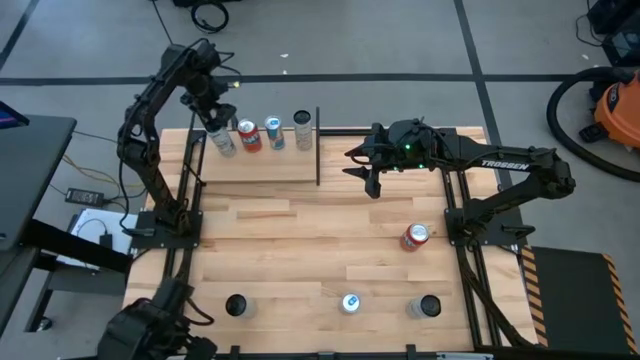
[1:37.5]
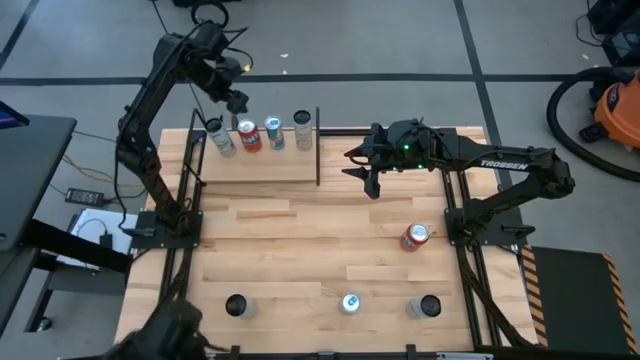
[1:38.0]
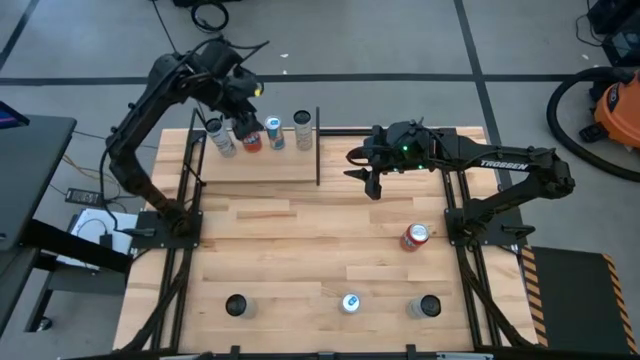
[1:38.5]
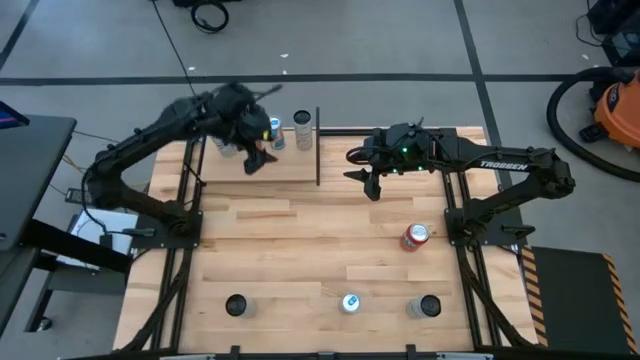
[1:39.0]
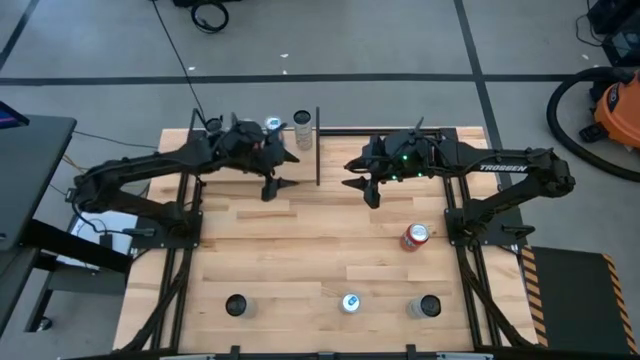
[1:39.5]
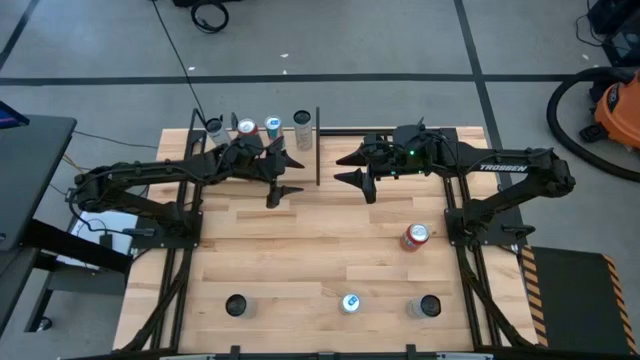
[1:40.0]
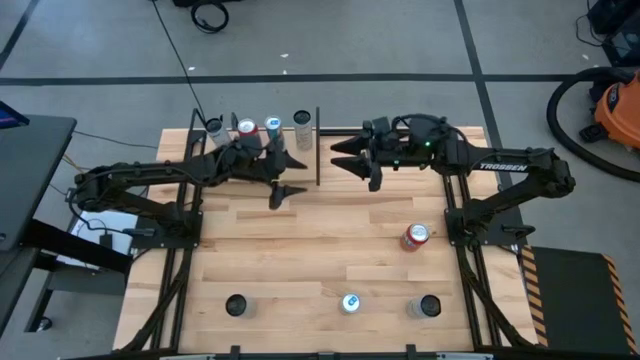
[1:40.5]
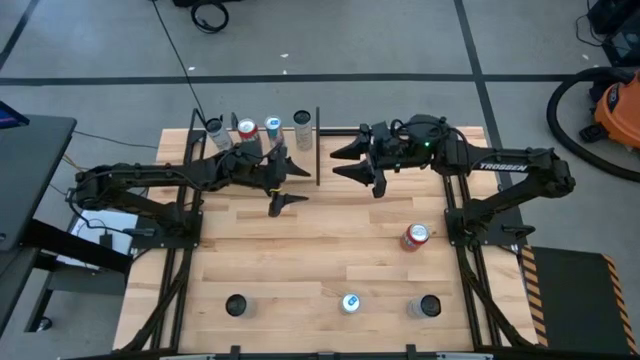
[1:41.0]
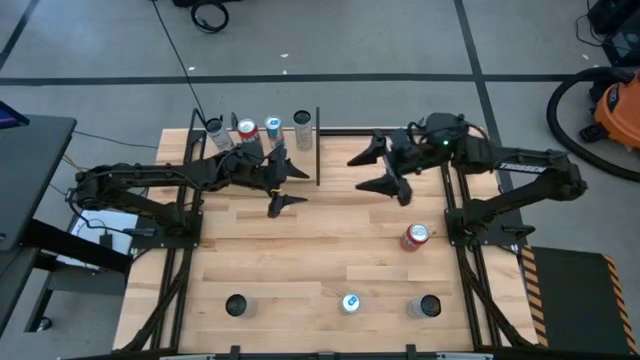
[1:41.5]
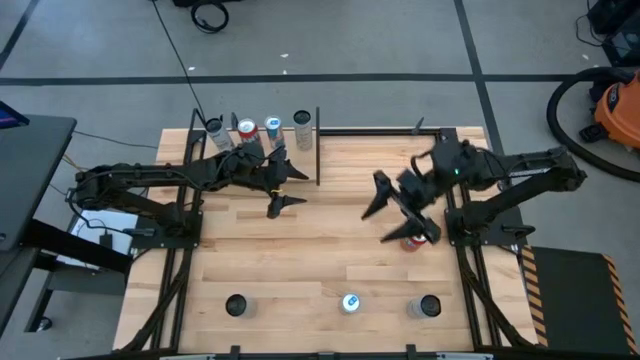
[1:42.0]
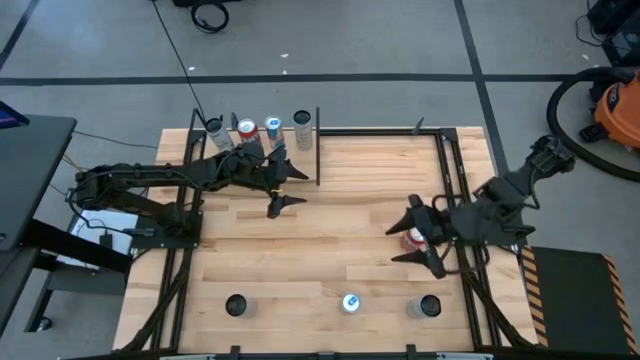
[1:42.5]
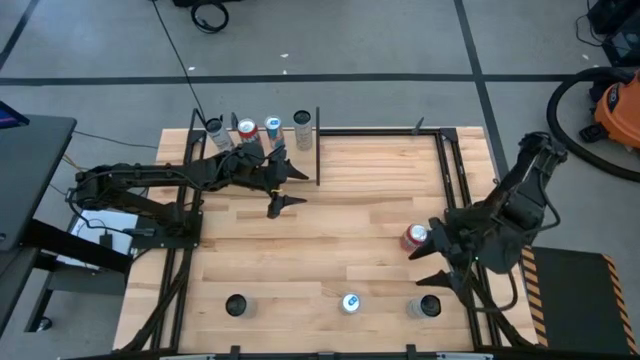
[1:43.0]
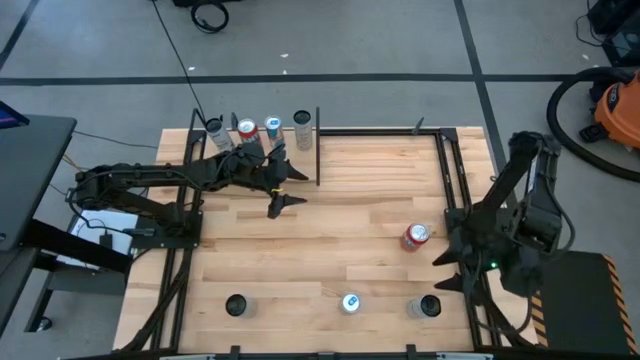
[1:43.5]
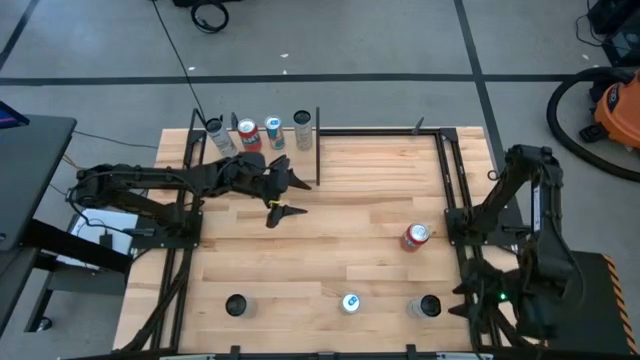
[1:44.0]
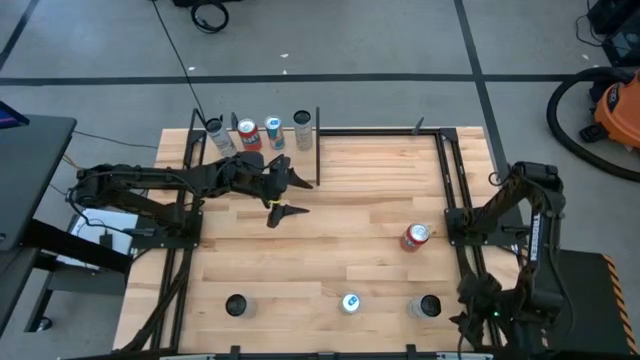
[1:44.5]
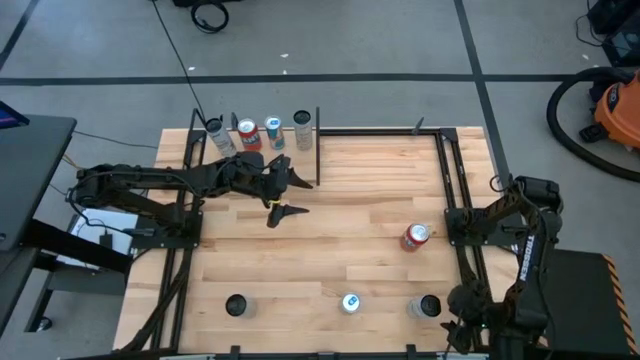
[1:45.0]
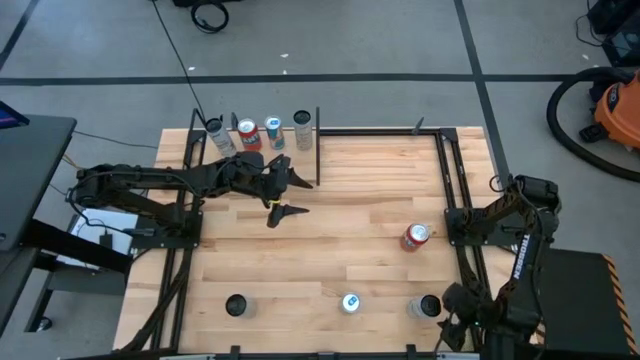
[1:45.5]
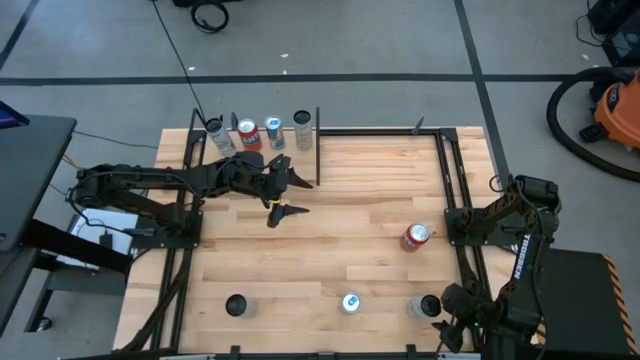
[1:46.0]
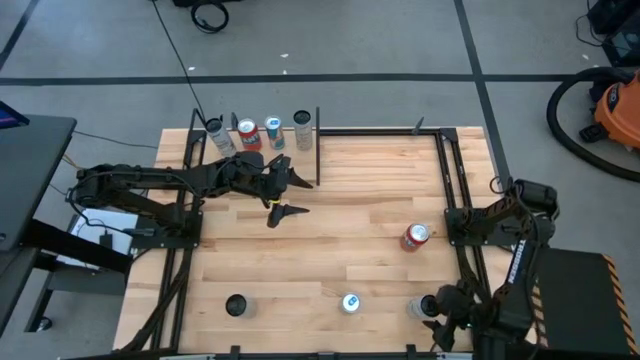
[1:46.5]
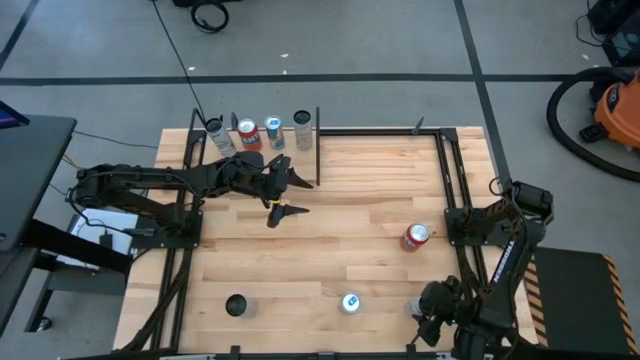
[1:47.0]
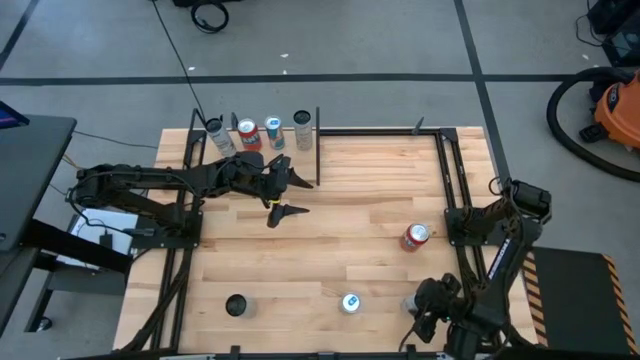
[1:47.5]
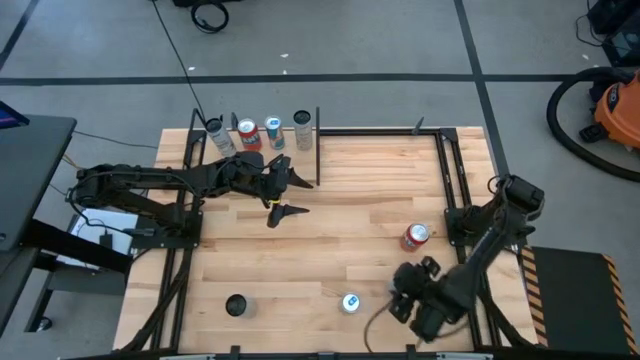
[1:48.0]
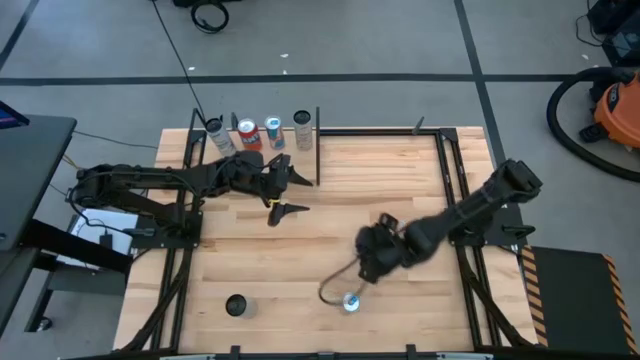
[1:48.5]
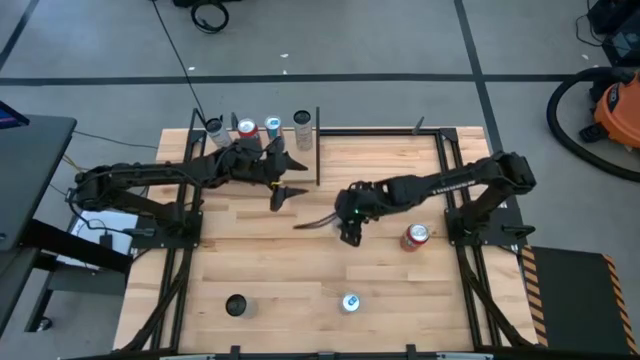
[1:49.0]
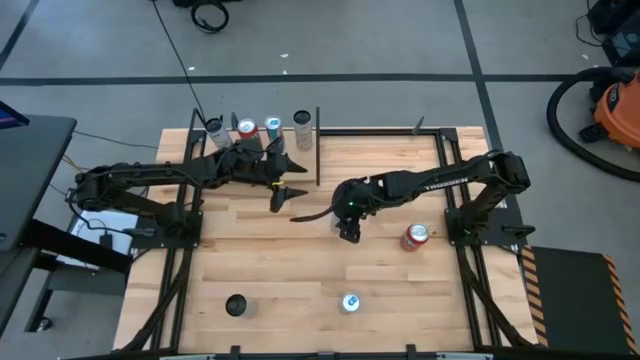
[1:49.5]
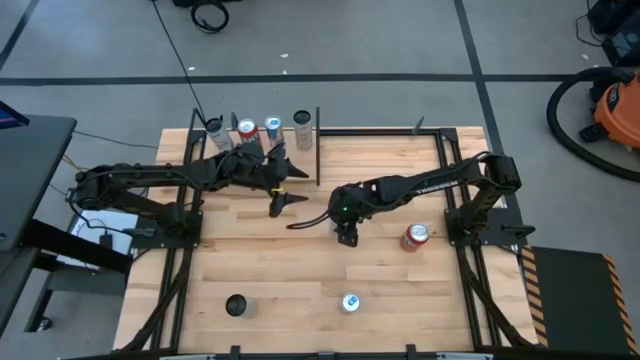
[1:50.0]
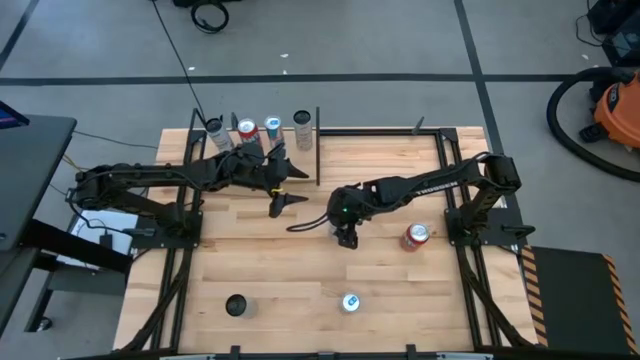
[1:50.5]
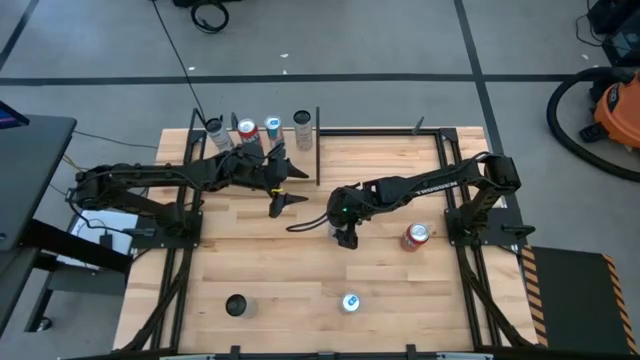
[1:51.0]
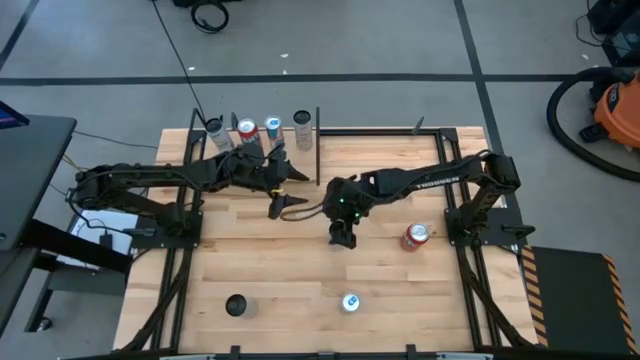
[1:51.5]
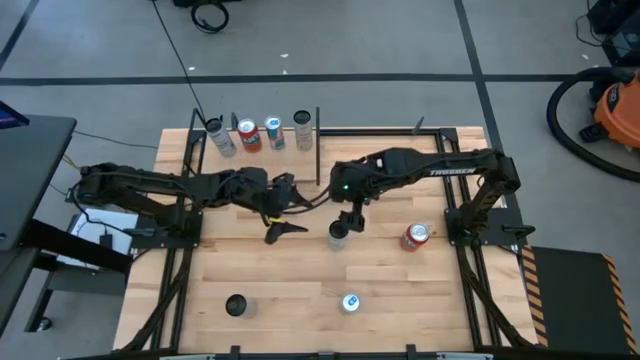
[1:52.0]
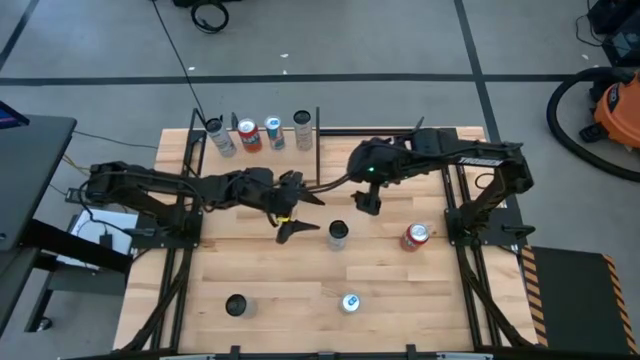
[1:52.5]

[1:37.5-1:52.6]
Task: Place canned beverage on shelf
Put the white blue soda can aligned with the other white blue soda can on the shelf

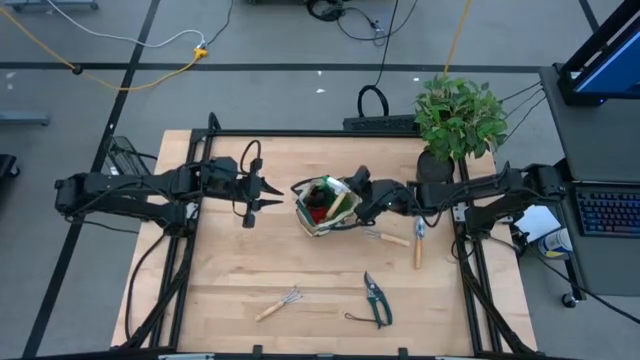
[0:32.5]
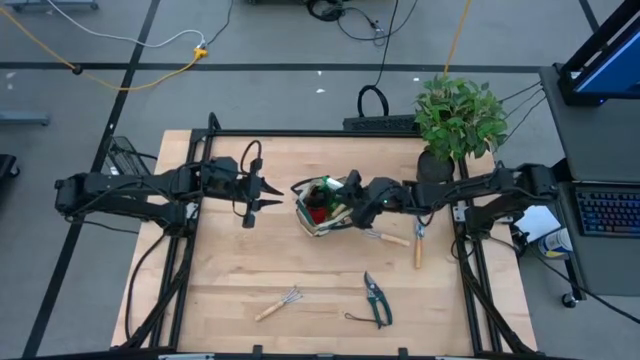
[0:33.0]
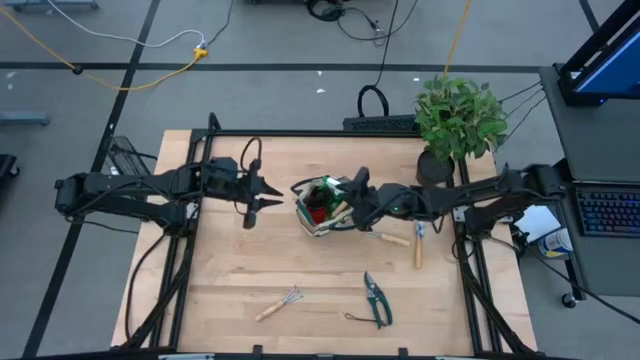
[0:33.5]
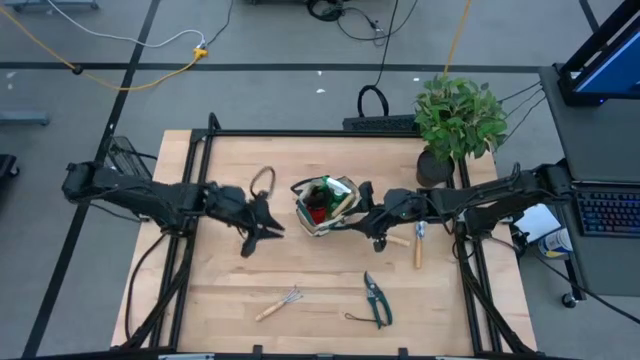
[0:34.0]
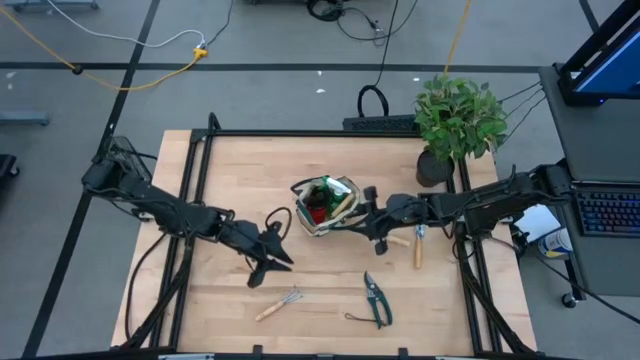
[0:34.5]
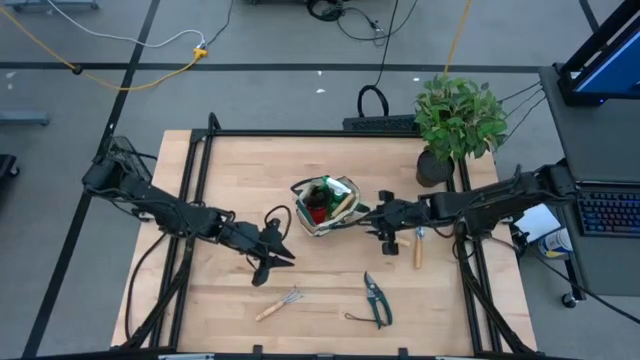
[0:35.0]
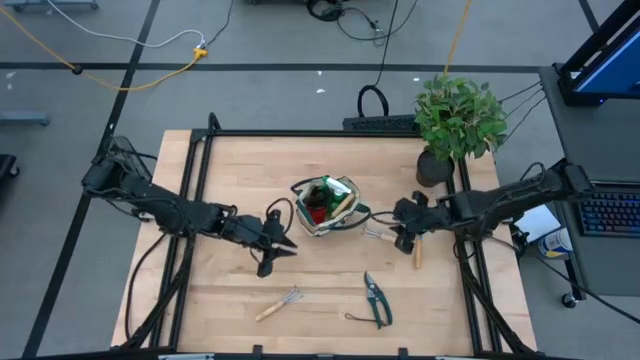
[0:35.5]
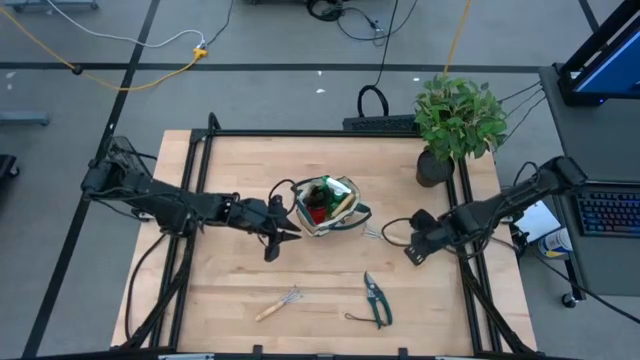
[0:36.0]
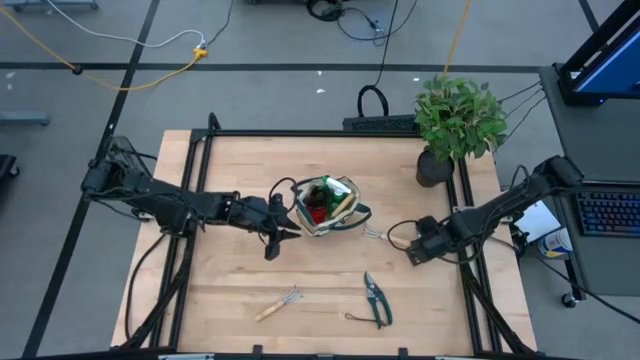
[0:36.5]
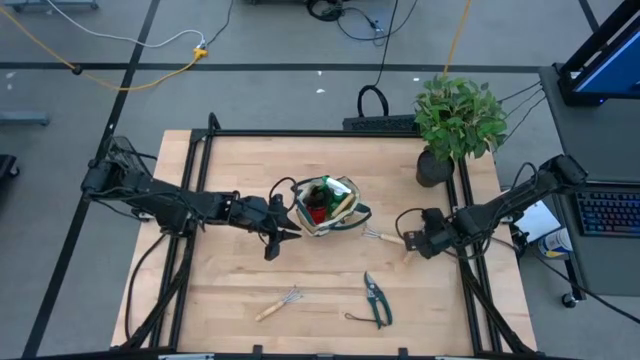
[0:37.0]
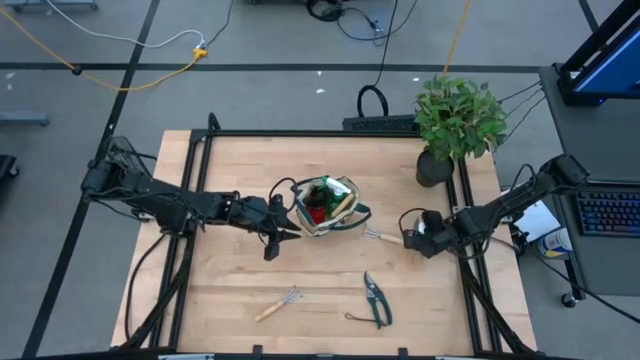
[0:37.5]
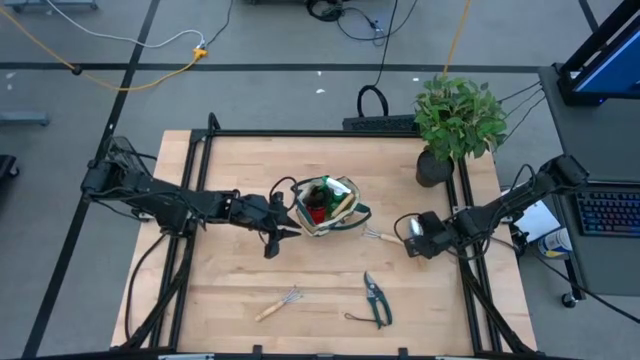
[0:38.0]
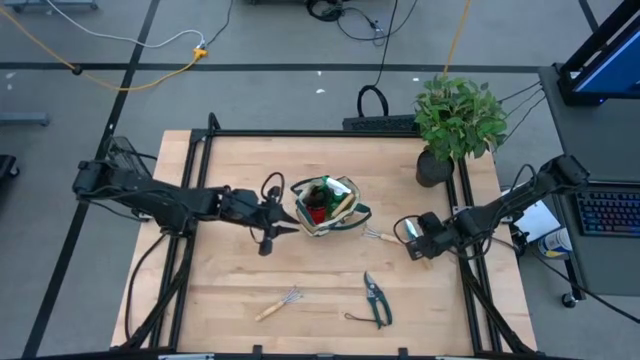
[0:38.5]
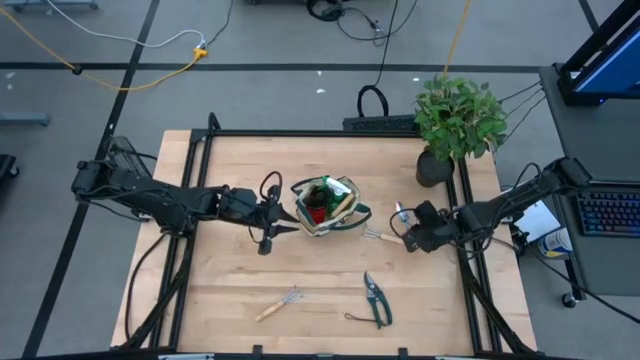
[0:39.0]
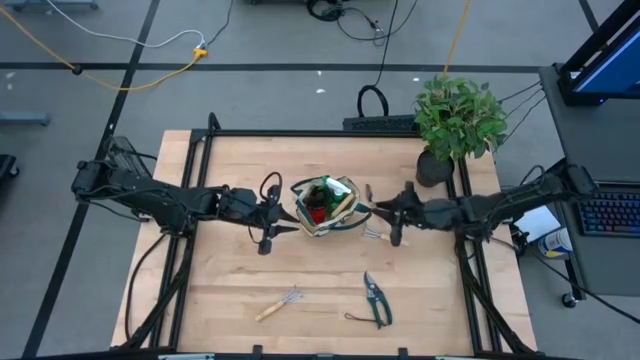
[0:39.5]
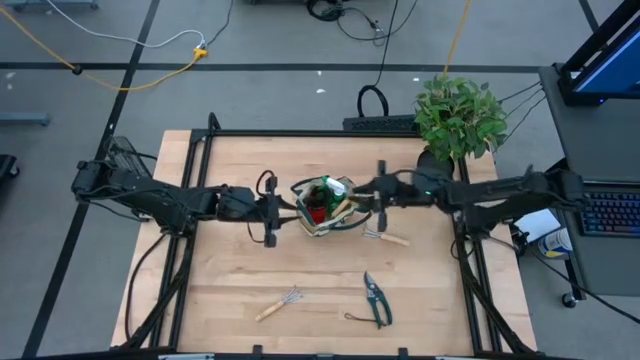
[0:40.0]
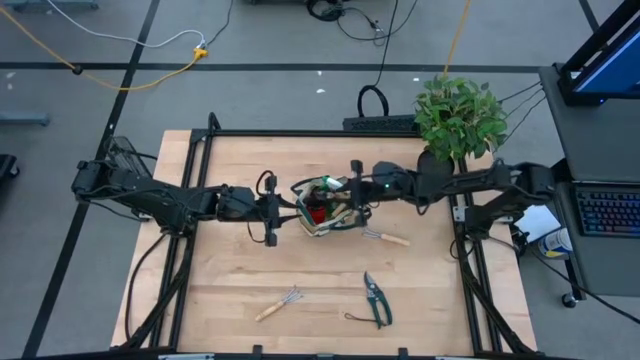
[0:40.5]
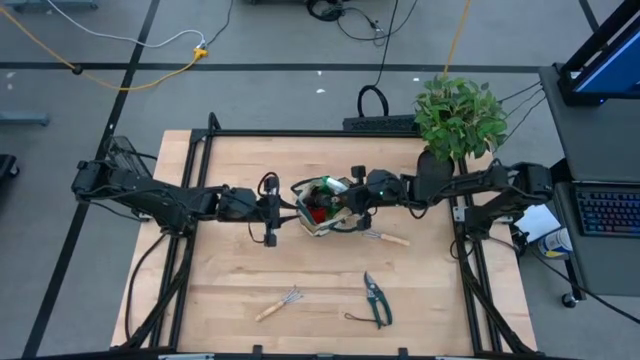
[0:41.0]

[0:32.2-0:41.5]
Task: Pick & Place Garden tools in Gardening bag
Put the brown trowel into the green gardening bag
